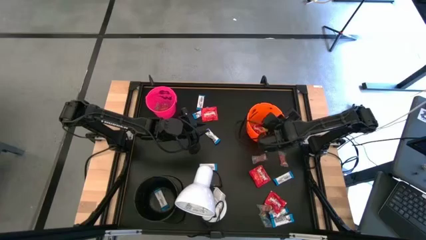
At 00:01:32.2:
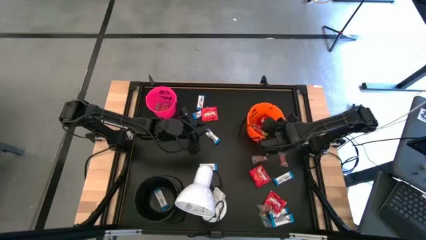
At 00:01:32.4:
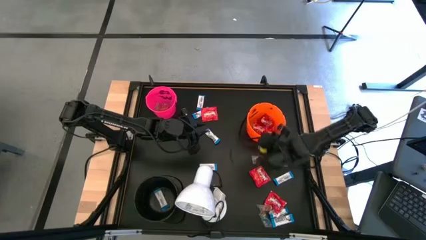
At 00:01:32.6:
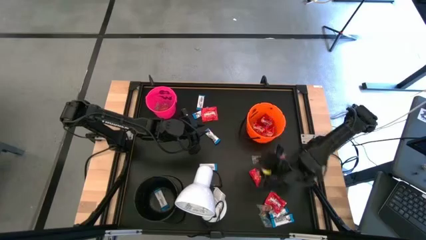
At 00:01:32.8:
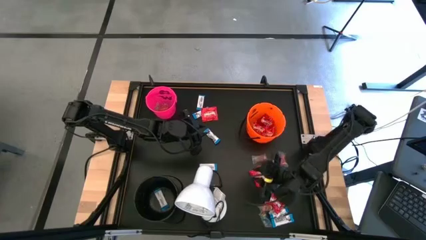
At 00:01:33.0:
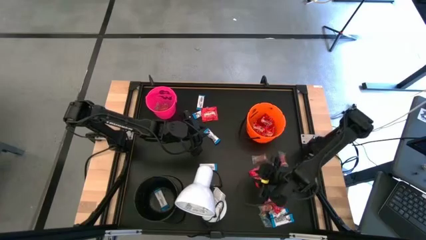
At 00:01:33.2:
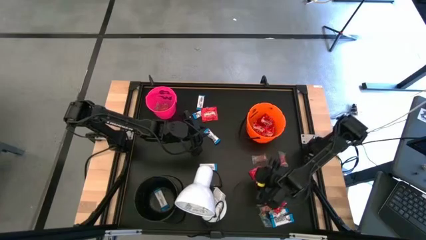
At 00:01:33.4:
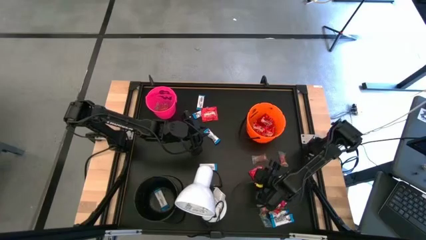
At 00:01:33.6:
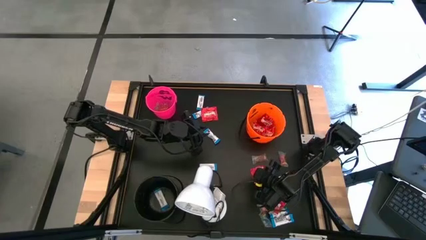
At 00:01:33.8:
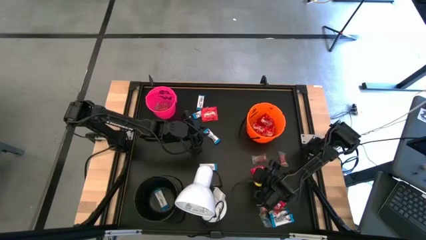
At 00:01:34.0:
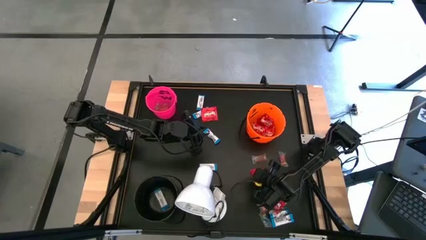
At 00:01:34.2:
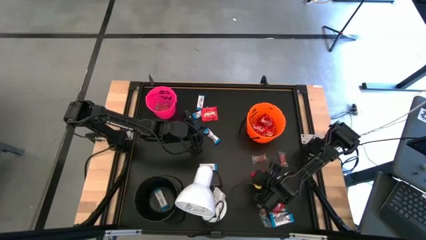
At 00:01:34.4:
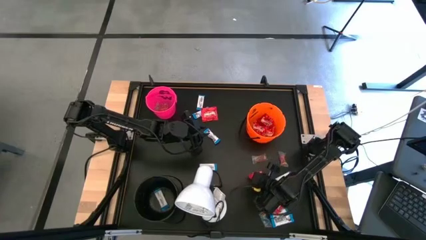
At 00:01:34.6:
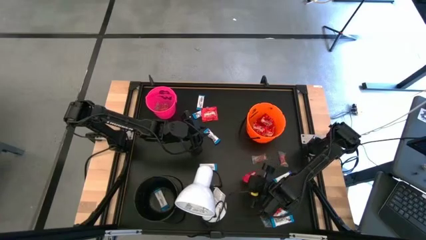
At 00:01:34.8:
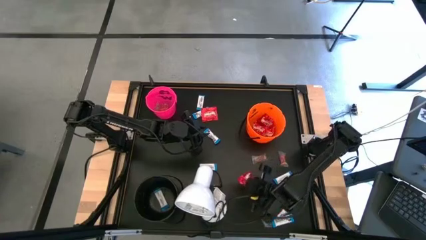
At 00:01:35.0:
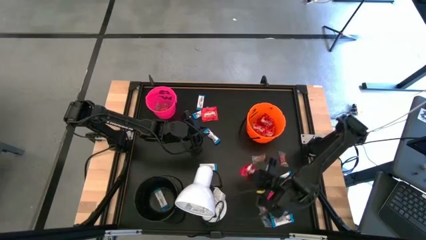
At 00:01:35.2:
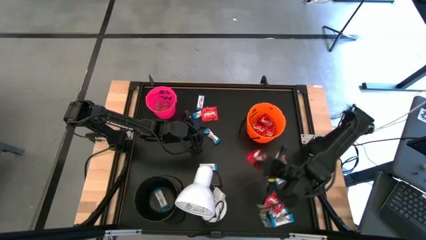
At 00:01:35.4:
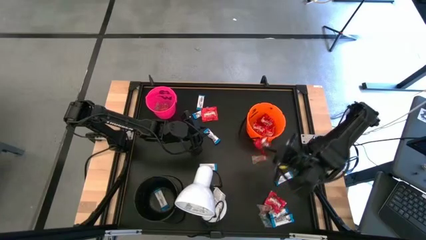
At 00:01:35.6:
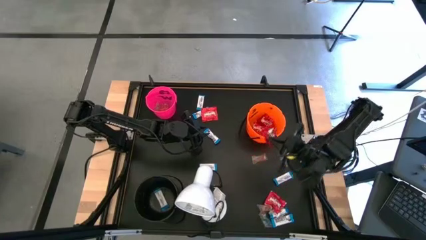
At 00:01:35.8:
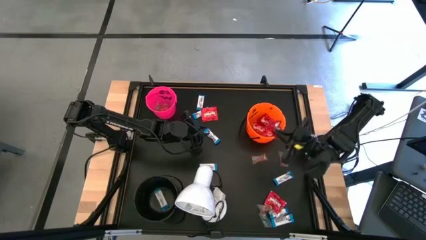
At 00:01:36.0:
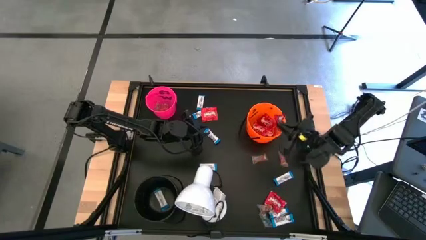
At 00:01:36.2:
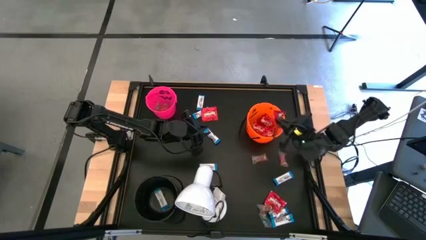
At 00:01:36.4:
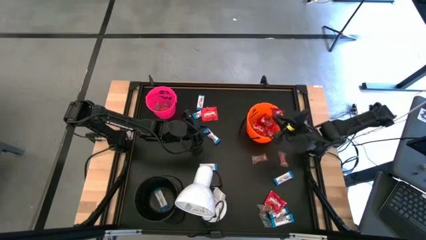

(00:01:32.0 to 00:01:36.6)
Task: Sort candy
Put the red candy into the orange bucket

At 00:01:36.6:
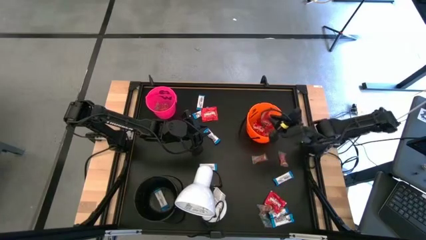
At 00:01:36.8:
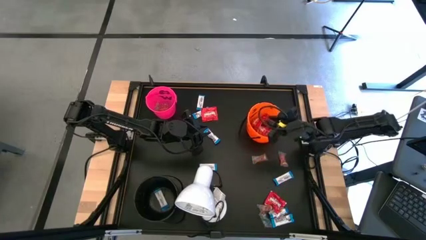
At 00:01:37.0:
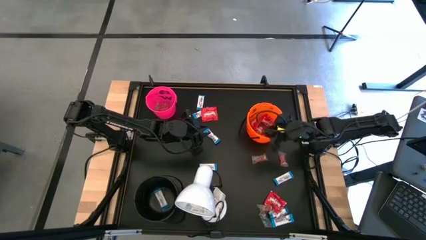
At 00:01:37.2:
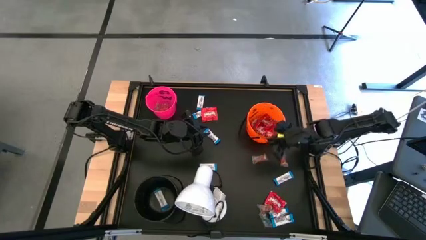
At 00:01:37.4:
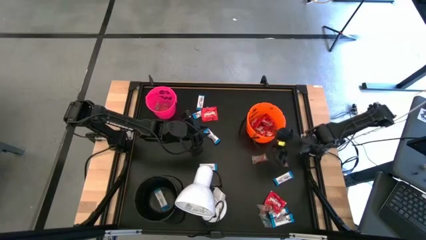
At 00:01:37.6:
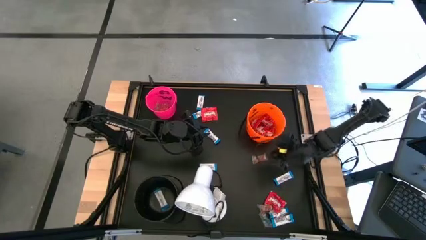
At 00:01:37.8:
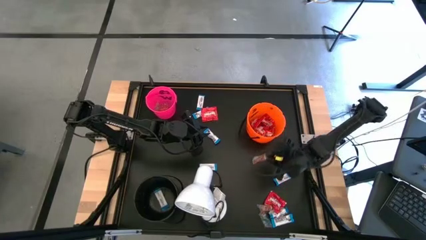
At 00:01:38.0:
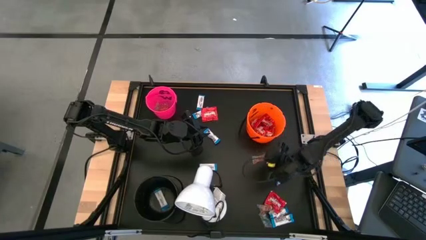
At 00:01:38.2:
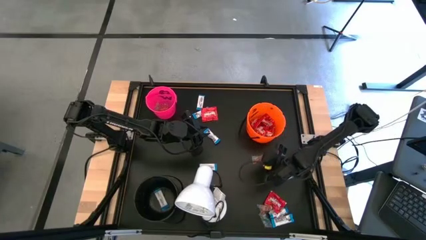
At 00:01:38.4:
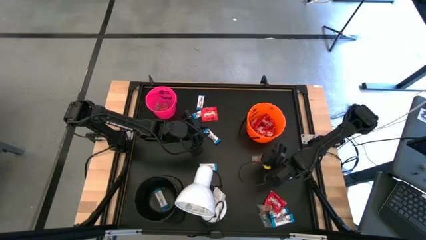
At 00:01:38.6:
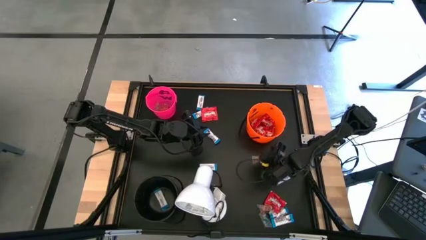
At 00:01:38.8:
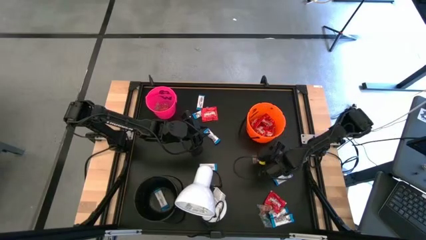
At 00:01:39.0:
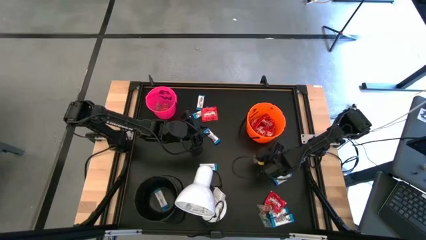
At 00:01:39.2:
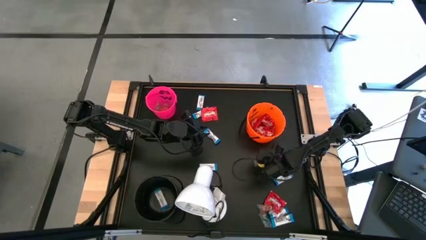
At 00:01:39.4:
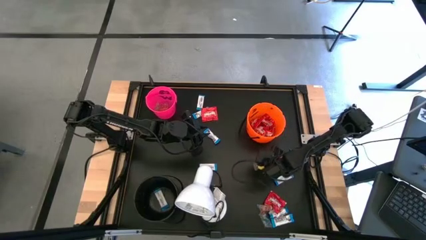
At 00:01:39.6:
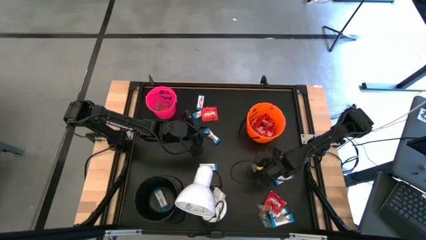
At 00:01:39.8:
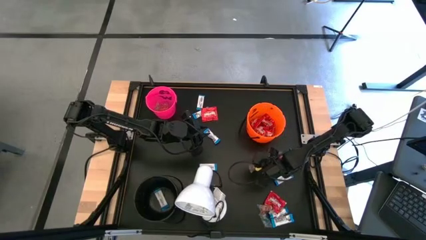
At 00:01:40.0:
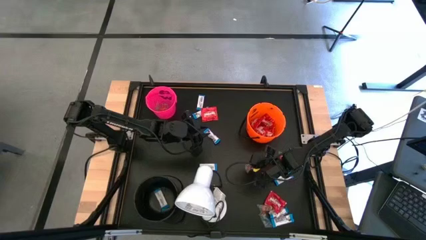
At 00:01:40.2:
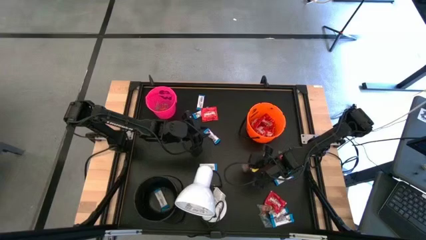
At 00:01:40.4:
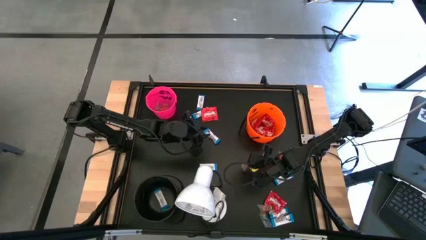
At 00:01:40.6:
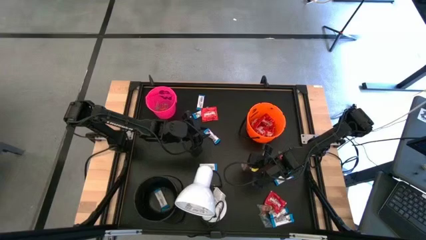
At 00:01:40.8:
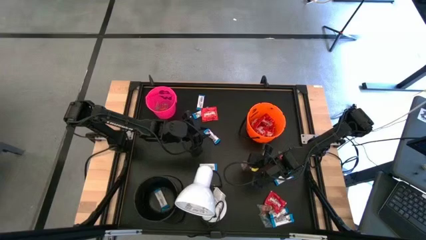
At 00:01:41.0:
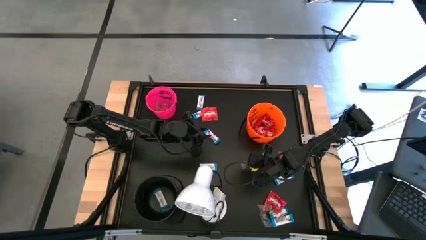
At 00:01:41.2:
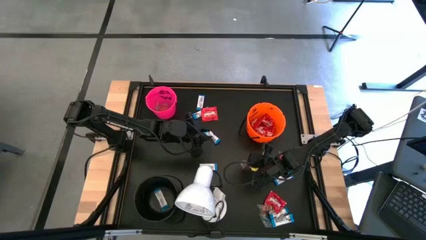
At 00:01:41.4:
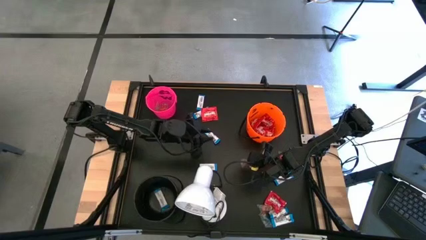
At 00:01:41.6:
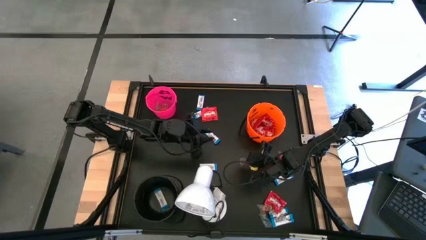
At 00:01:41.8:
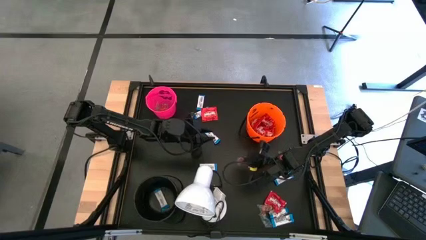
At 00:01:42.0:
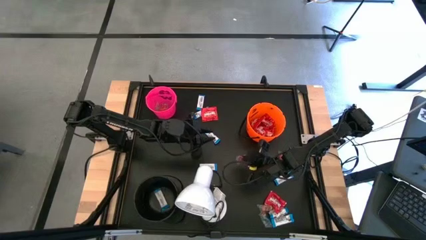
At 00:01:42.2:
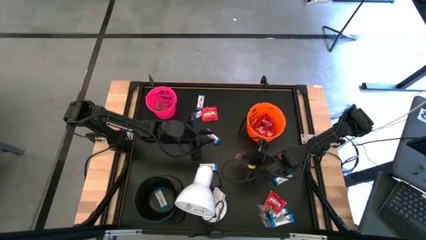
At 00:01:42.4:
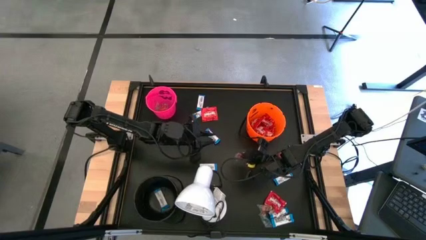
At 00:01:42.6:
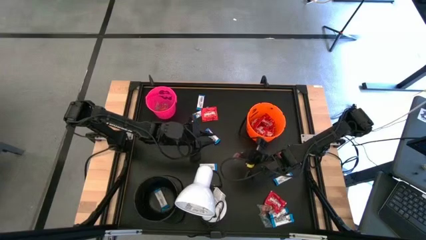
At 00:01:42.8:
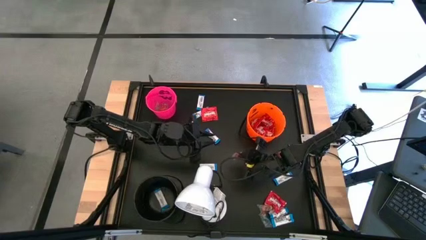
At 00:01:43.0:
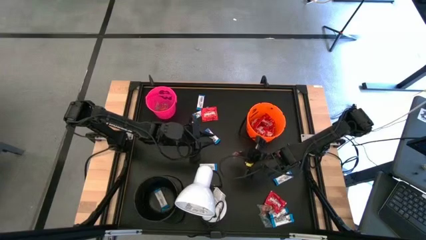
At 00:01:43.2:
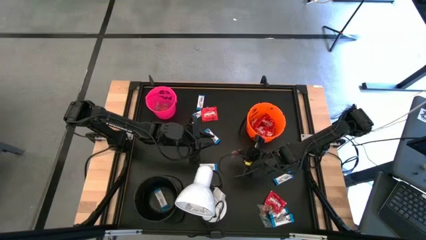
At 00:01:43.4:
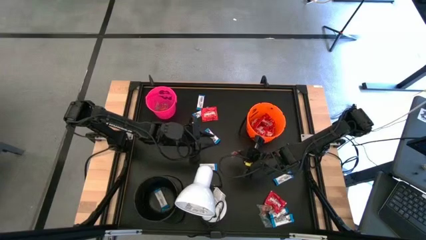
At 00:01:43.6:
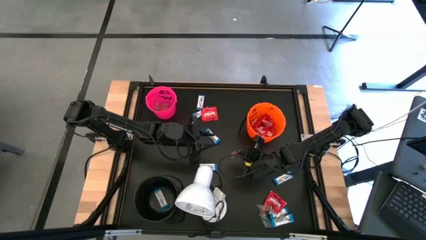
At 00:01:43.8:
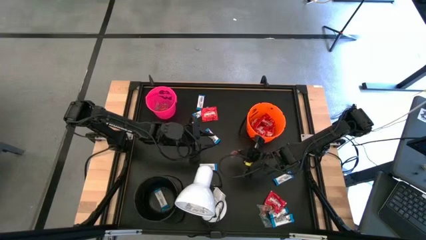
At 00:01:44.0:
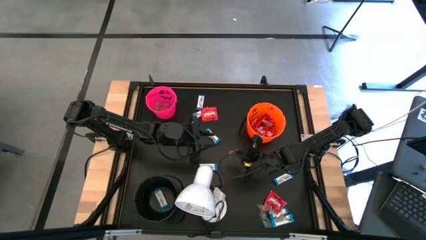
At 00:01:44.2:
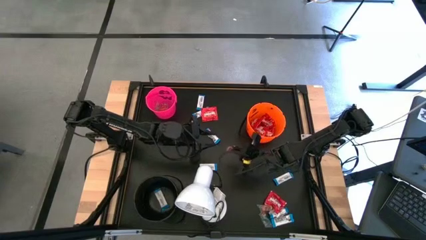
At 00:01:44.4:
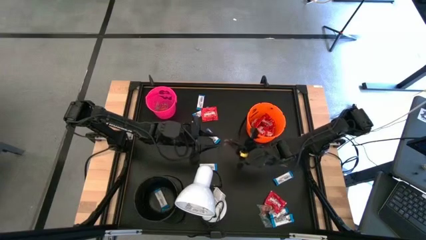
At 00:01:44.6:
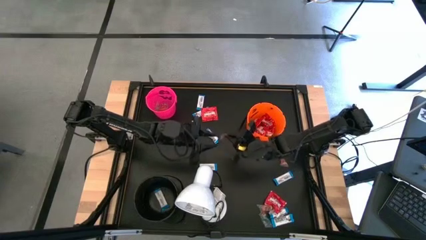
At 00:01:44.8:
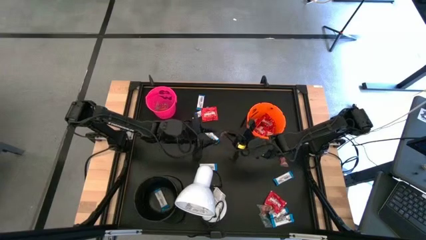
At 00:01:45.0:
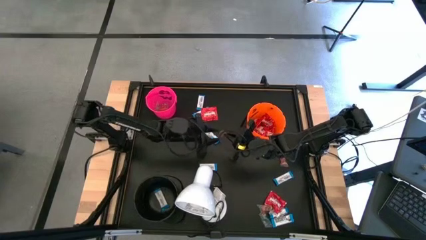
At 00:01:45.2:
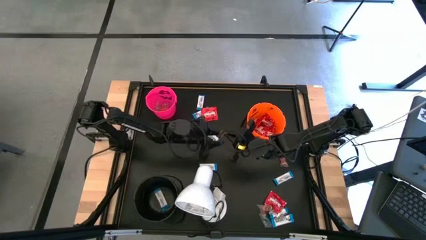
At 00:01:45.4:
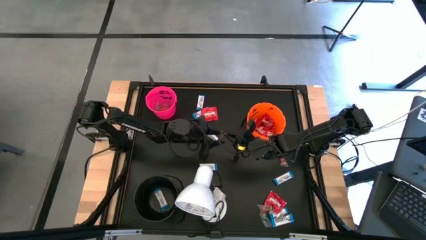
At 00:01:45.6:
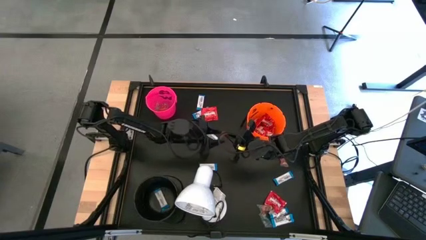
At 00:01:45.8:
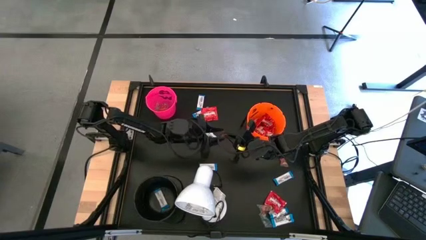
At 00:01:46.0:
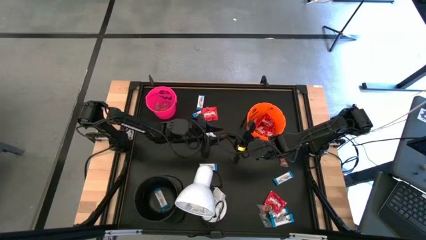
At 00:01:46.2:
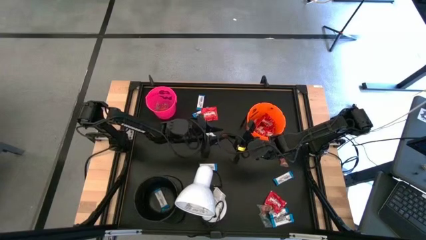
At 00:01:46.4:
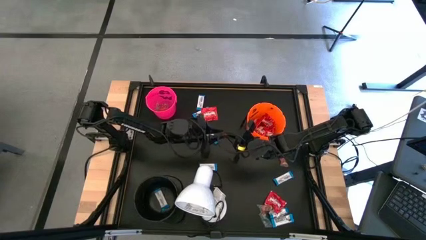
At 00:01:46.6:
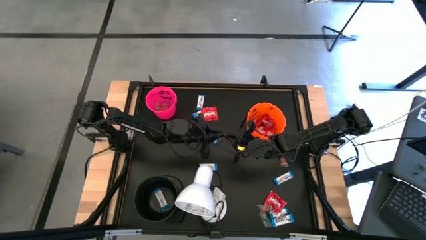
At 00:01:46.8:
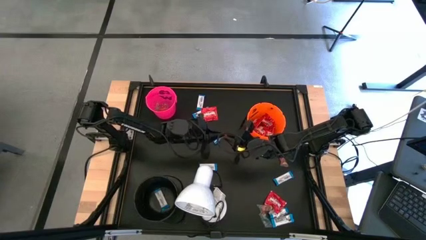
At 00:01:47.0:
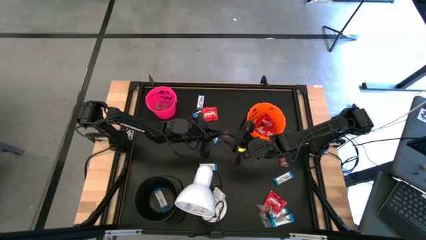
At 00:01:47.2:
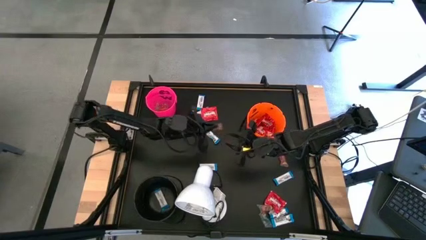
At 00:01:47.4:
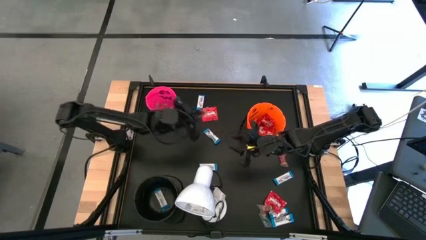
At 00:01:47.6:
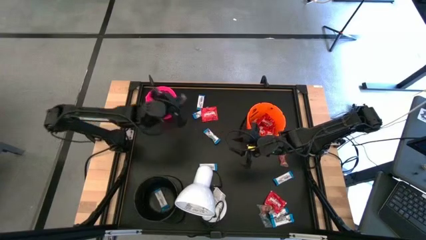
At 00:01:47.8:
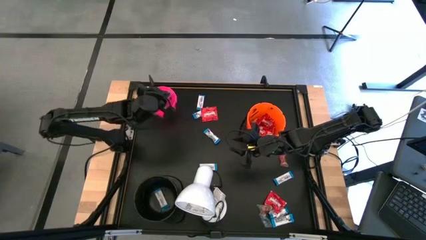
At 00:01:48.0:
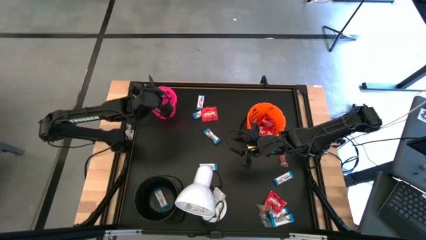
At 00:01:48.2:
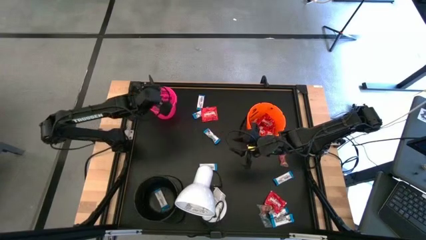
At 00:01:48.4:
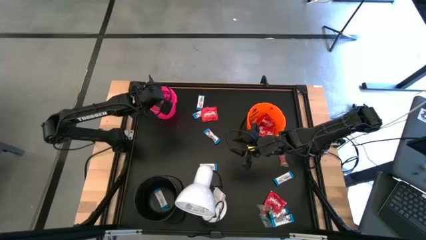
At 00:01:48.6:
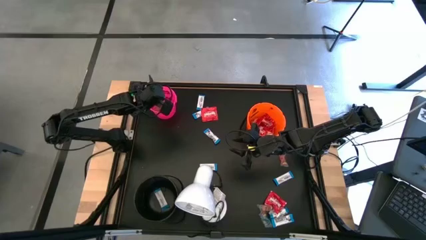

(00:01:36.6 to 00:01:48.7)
Put the orange gummy into the pink bucket
